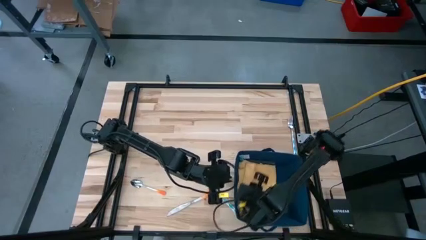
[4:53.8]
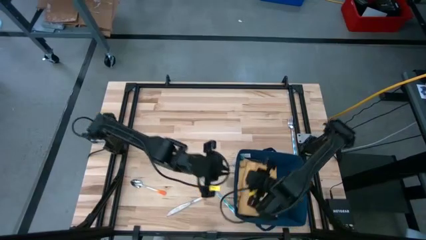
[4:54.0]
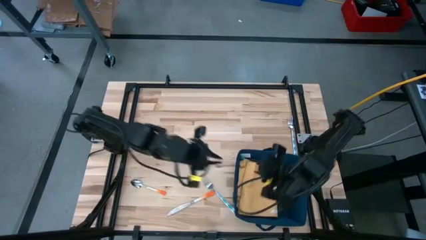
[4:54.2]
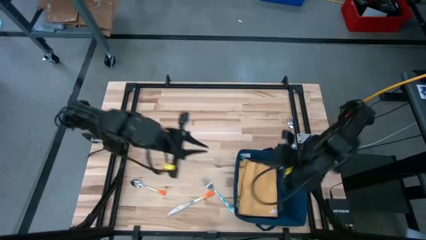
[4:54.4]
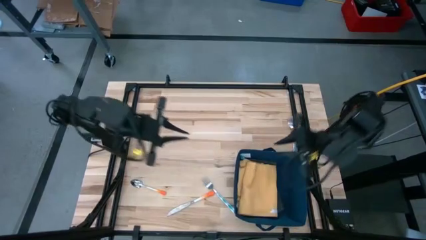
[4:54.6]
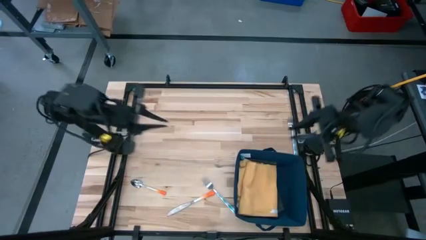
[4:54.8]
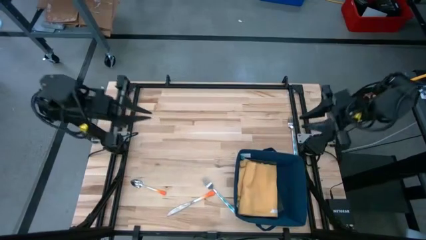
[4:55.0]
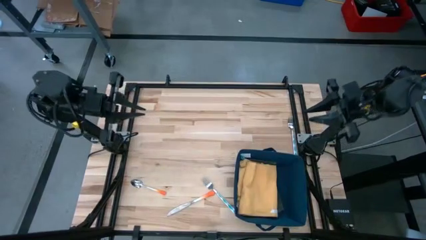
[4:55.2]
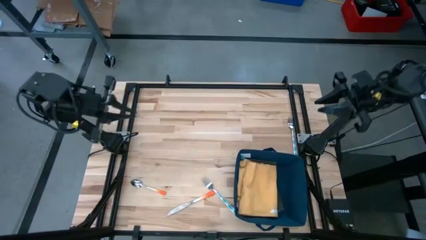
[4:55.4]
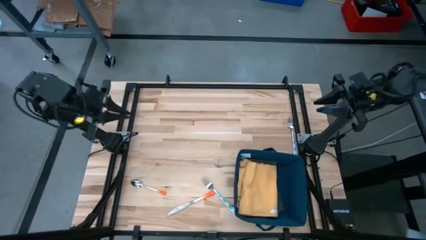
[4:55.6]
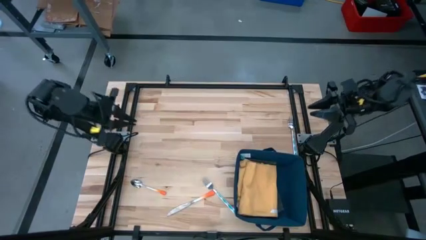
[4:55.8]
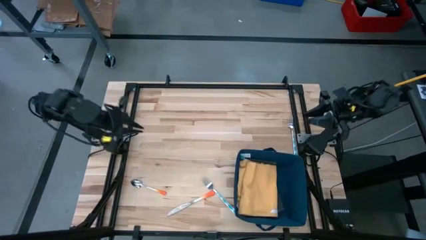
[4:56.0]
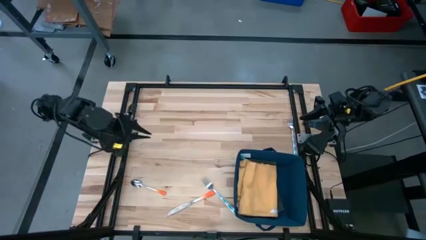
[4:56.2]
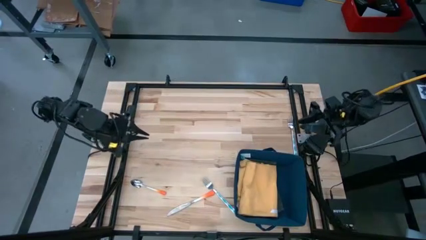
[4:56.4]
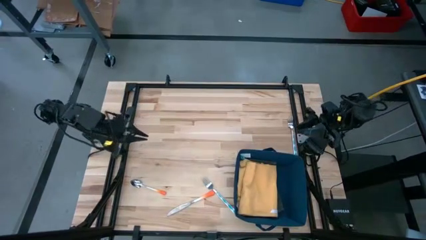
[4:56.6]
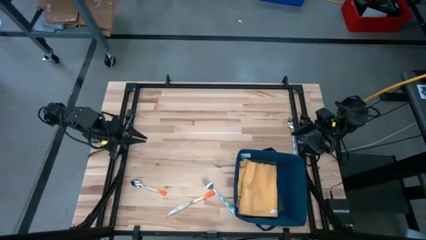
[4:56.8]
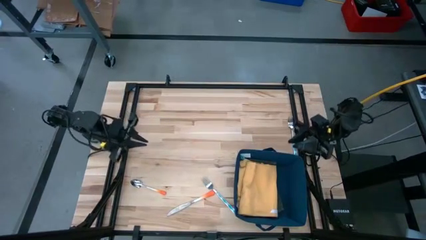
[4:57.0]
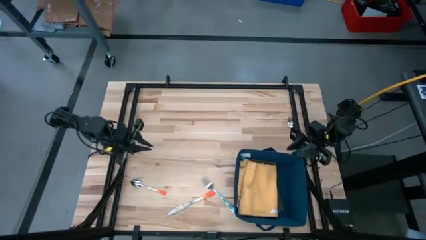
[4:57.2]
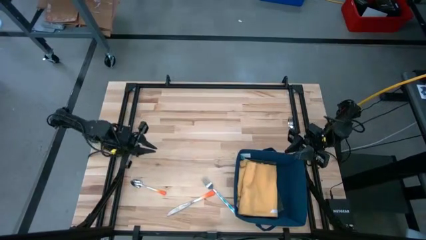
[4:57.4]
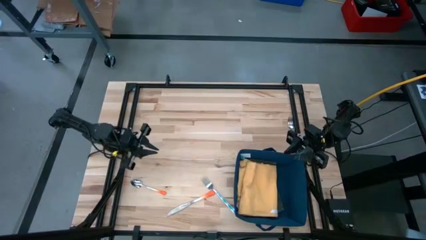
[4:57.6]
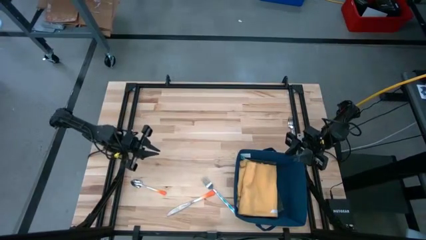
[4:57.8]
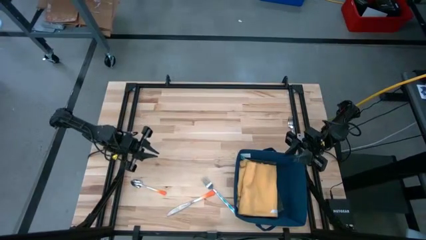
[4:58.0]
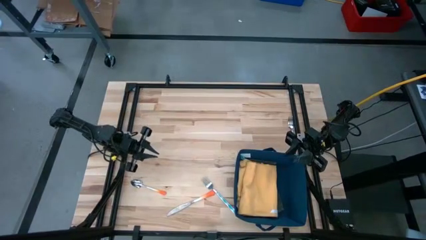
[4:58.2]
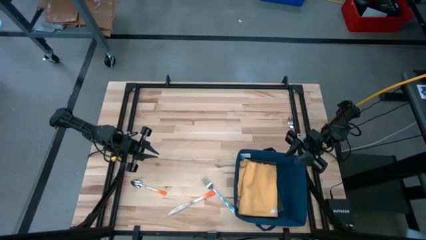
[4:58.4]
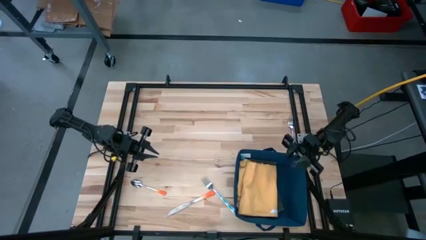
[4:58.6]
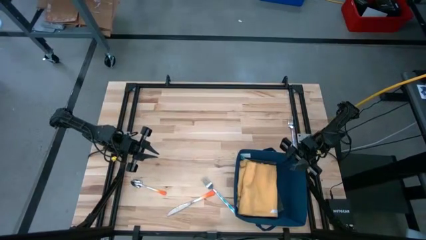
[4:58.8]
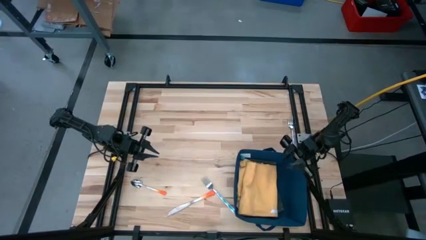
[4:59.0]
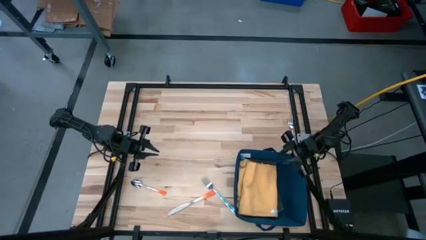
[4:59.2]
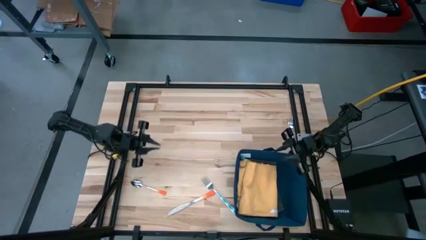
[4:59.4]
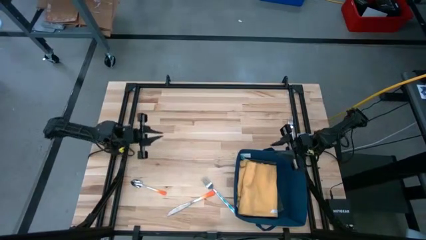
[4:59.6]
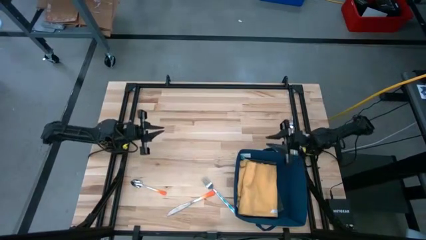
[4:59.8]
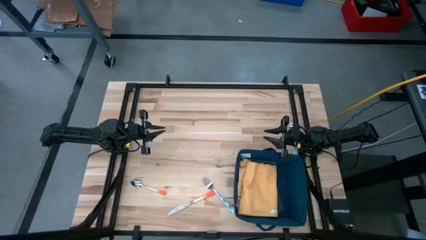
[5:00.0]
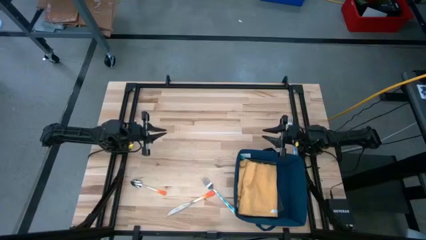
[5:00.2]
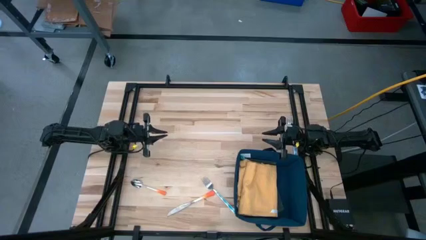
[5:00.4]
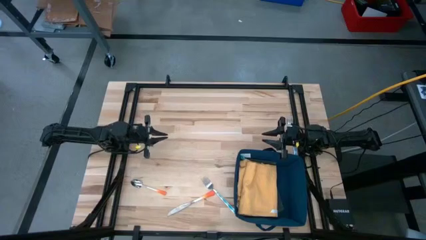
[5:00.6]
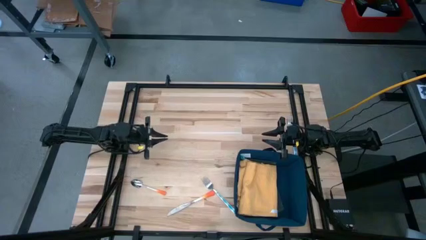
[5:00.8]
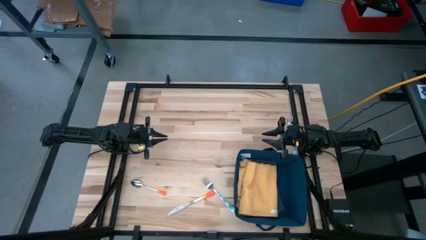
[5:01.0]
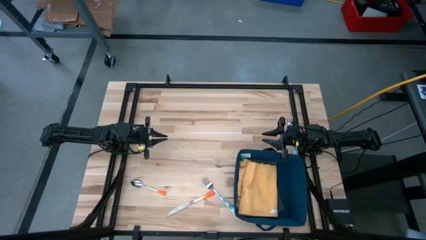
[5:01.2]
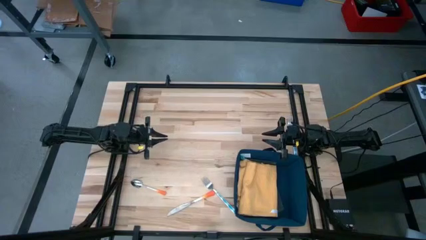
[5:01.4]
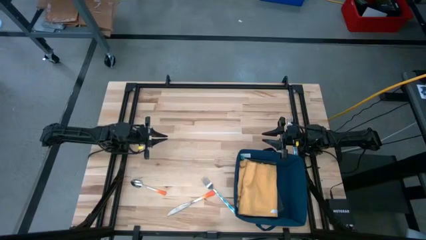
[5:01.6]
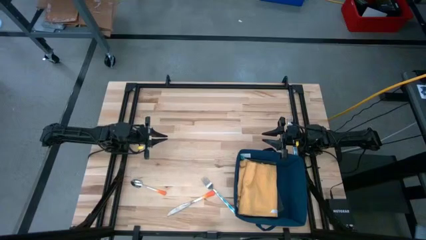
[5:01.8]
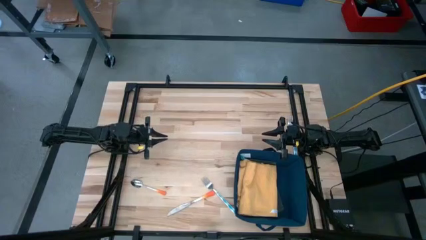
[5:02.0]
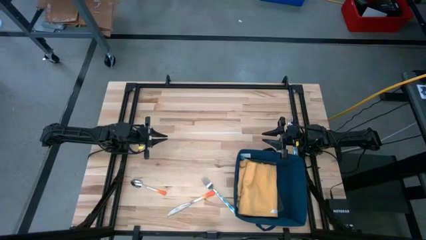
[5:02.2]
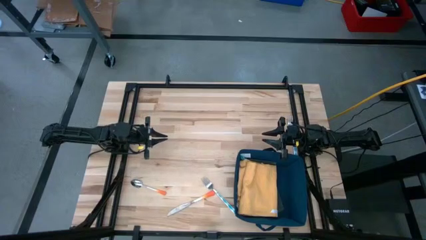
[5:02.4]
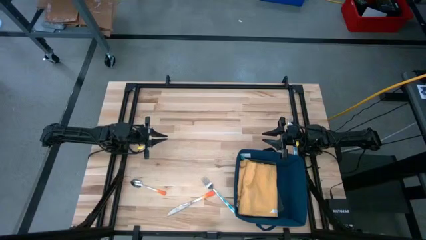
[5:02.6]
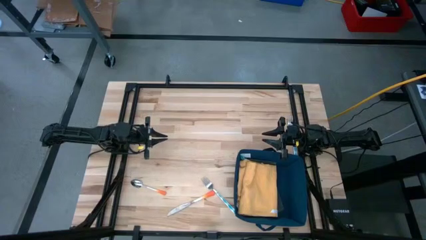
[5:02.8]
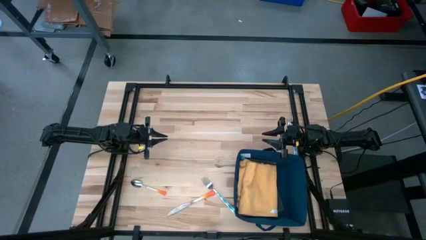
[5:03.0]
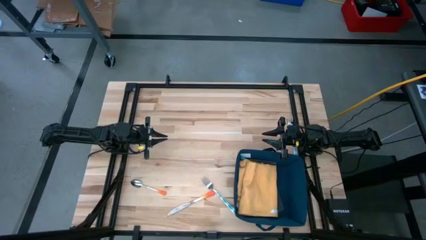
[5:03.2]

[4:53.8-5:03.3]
Task: Fold towel
Return to Home Position

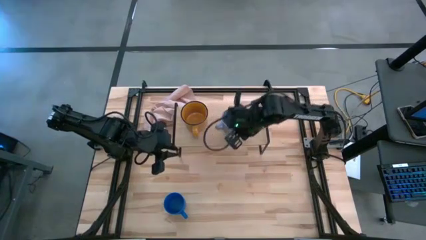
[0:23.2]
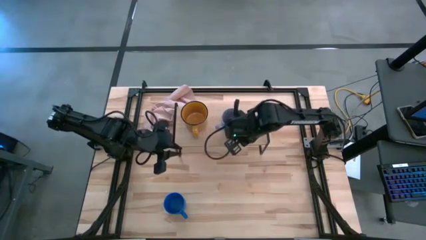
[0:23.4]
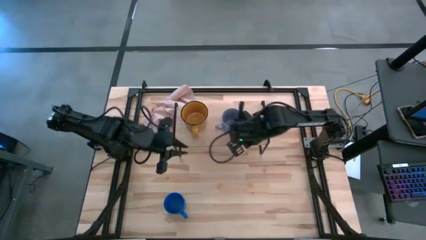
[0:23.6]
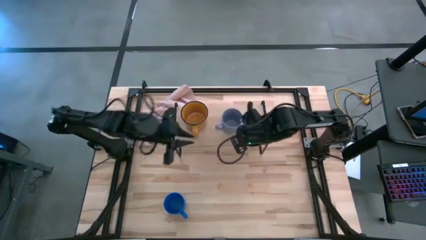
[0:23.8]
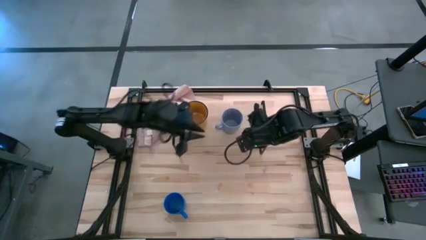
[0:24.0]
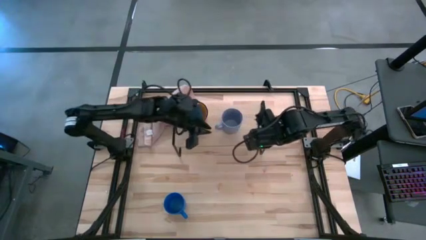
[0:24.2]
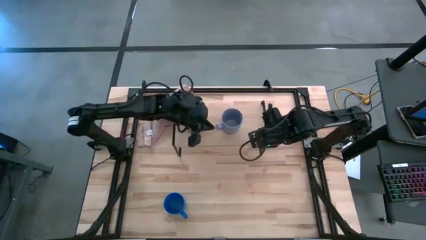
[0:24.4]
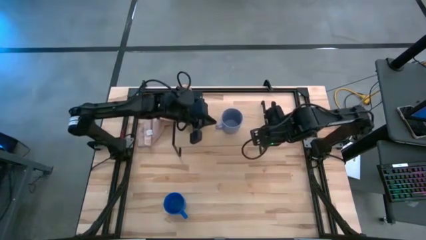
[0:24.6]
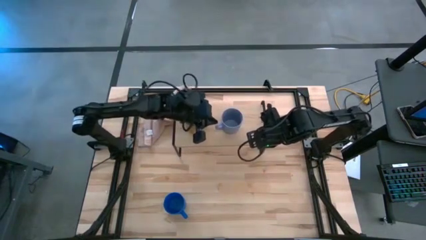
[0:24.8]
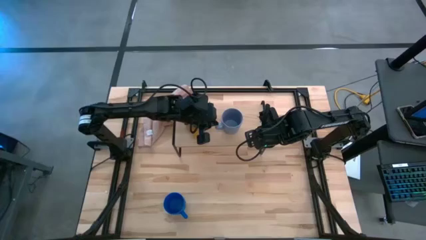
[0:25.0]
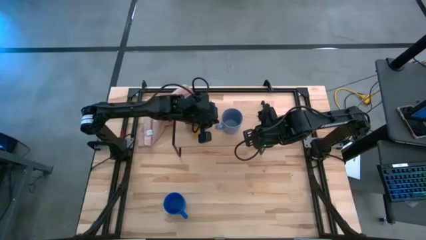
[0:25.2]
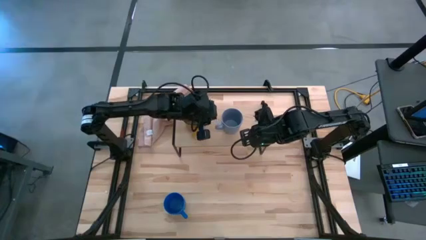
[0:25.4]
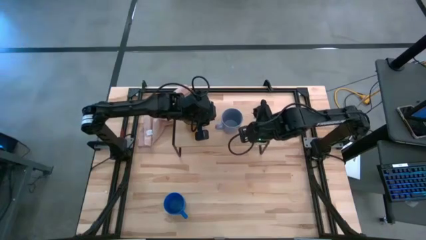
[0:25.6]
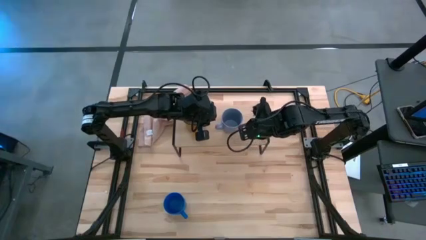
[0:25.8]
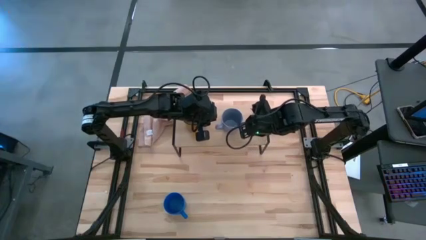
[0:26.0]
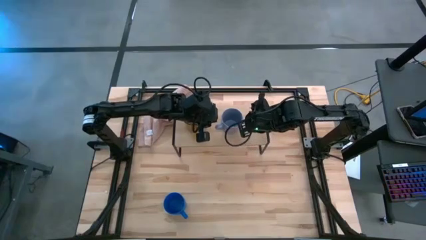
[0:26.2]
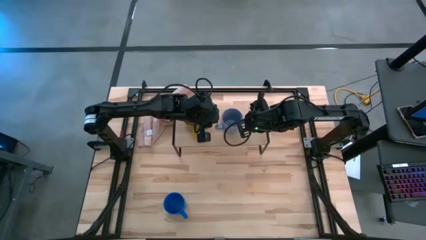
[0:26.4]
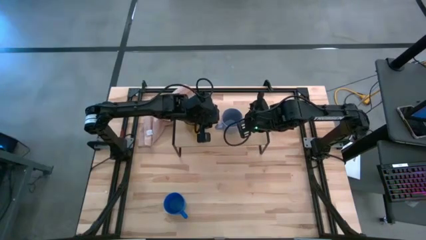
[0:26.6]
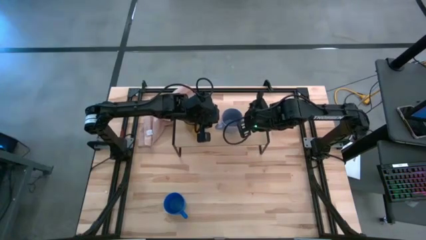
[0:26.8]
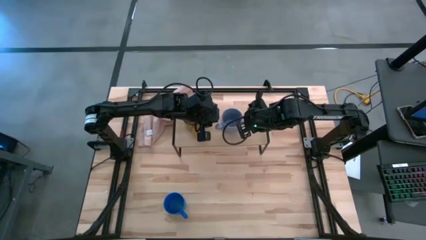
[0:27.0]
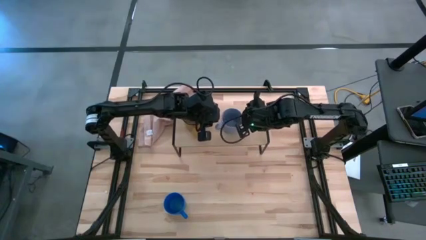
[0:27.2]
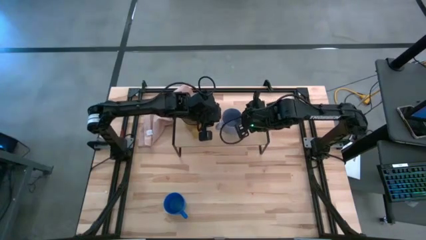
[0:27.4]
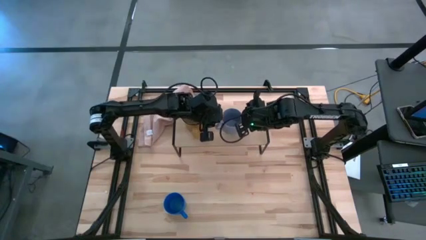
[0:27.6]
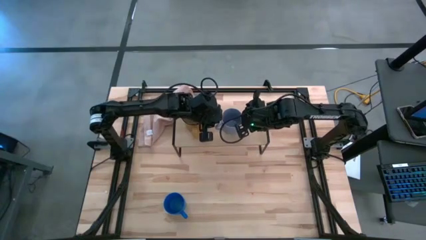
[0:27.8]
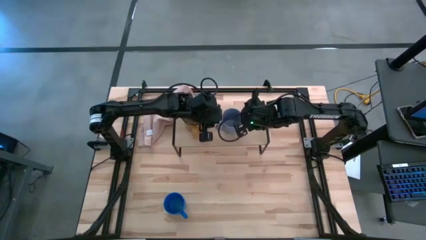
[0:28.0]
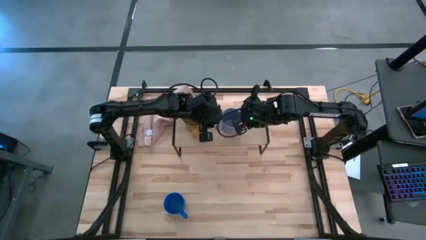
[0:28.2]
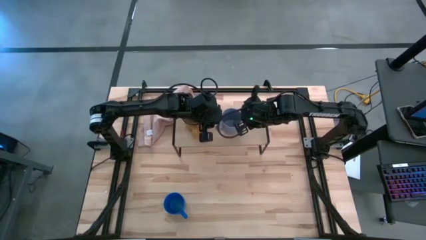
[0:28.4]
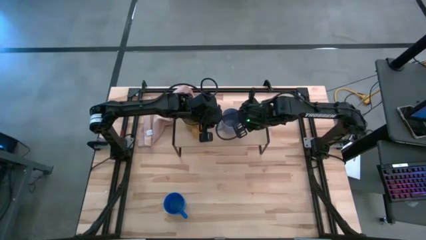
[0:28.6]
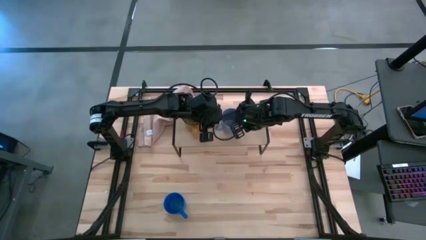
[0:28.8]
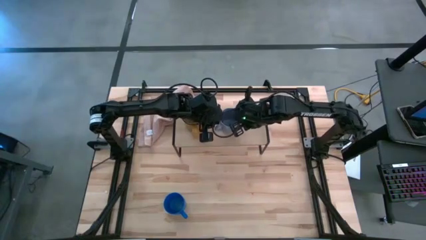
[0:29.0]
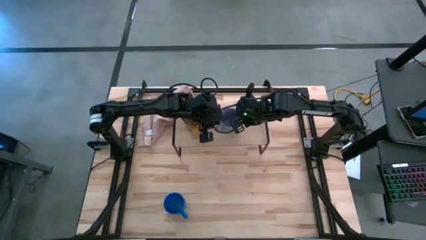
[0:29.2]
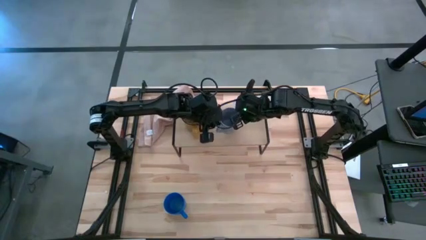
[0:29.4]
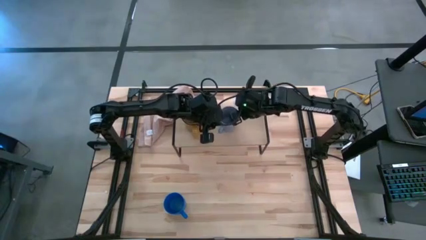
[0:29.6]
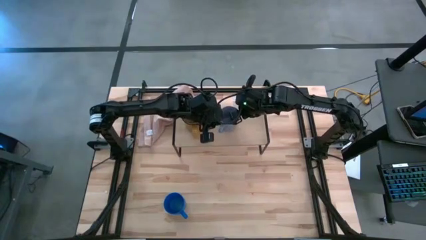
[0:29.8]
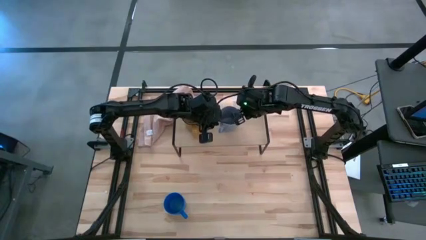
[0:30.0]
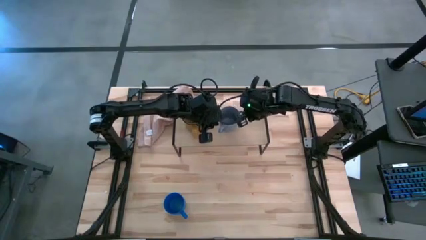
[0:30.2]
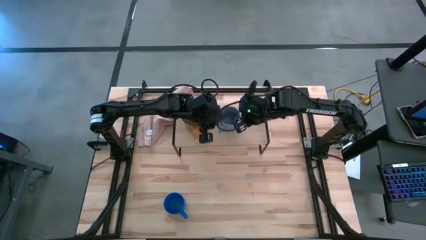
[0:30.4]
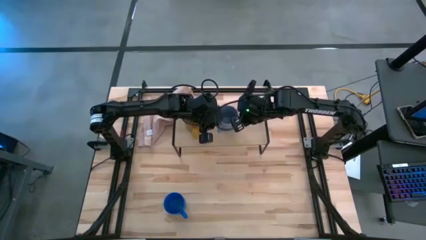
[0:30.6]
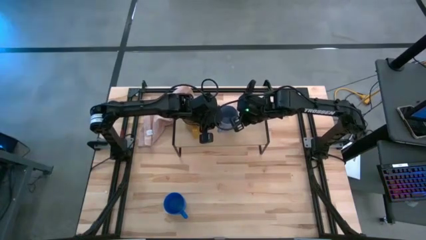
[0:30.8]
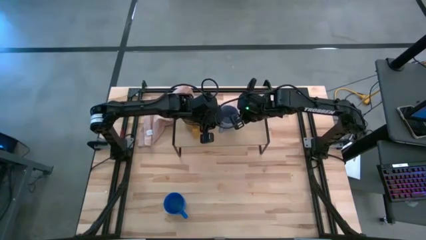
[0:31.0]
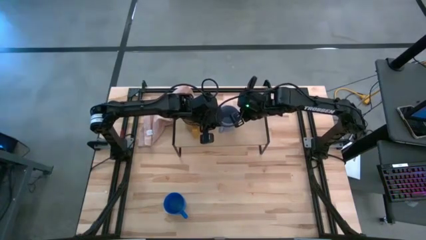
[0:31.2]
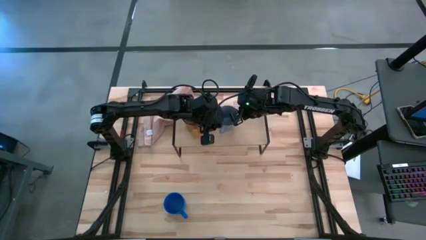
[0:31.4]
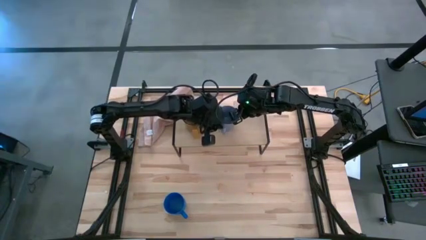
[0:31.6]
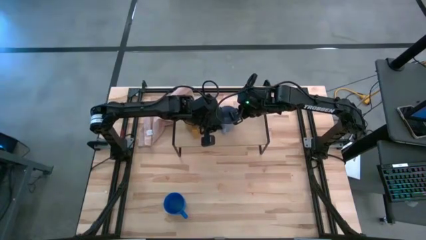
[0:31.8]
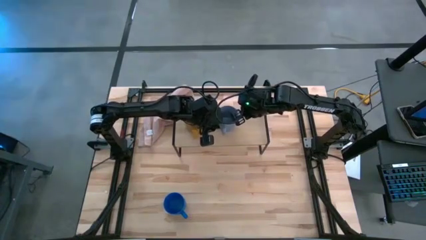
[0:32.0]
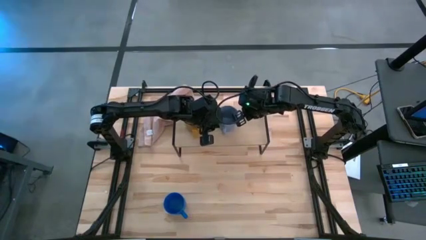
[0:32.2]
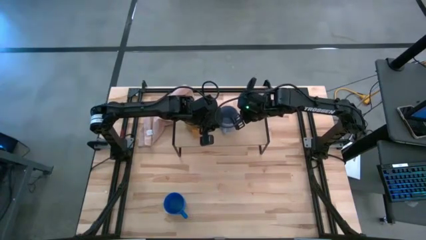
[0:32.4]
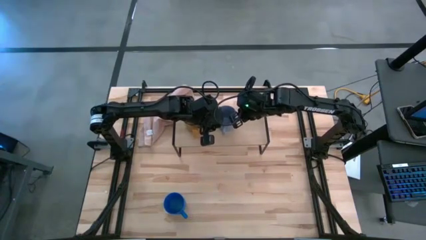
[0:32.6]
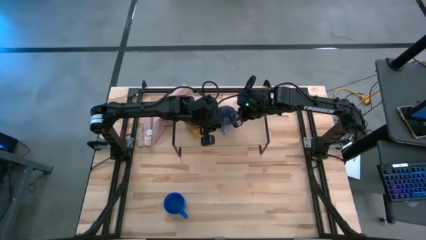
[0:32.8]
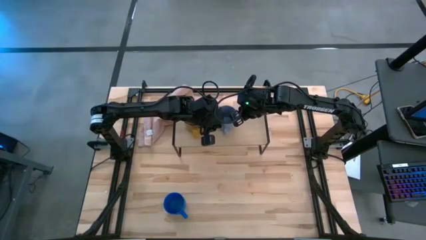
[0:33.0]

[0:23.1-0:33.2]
Task: Stack small to large cups/mugs on shelf
Put the light blue mug on the shelf
